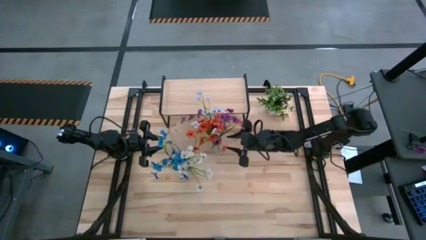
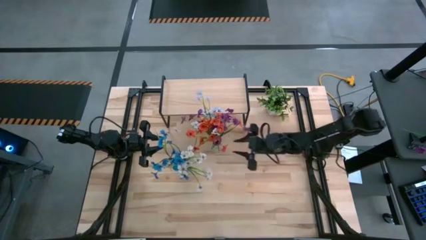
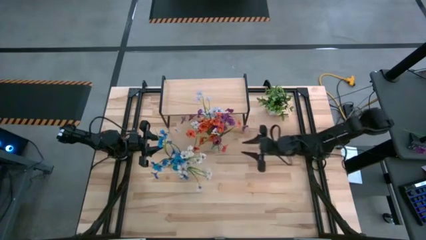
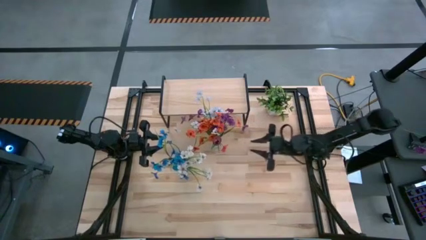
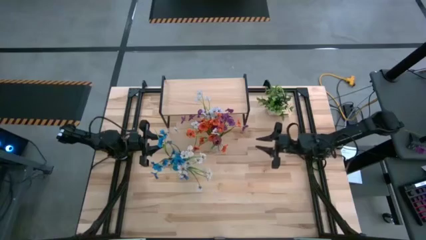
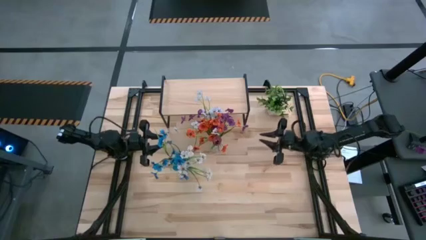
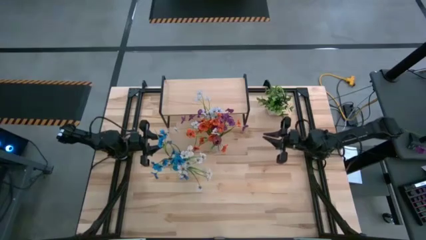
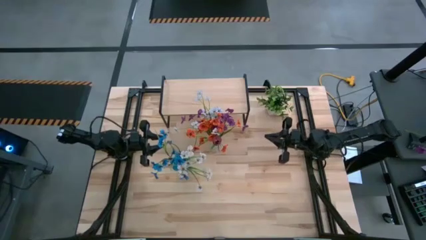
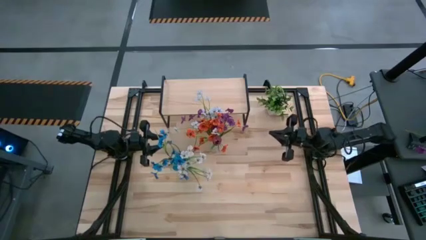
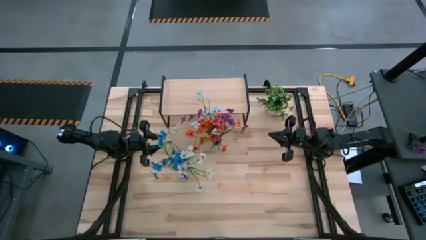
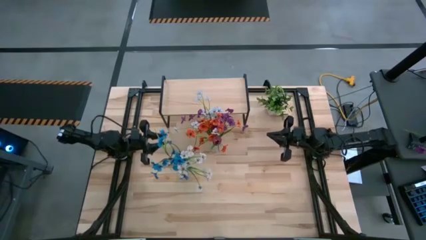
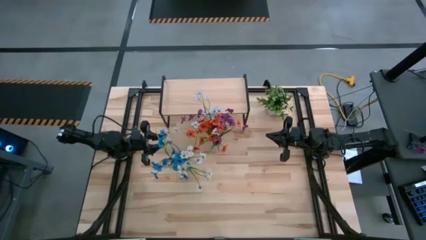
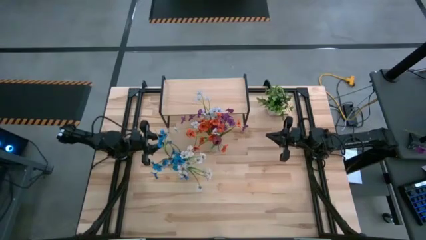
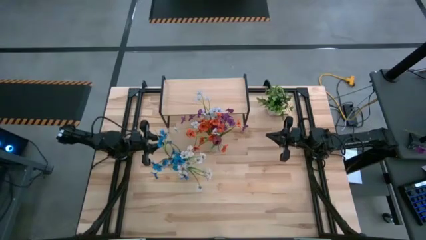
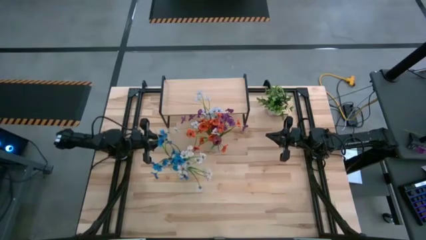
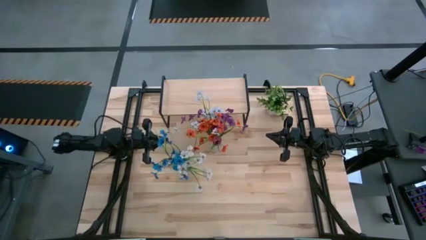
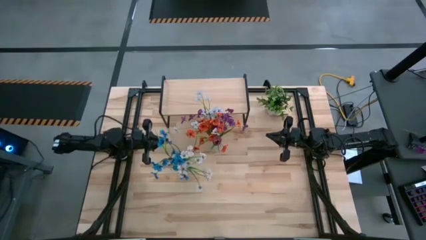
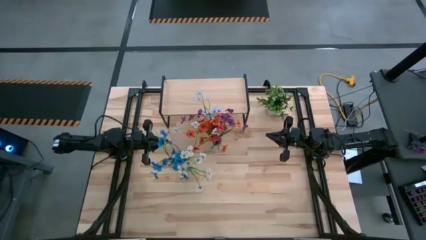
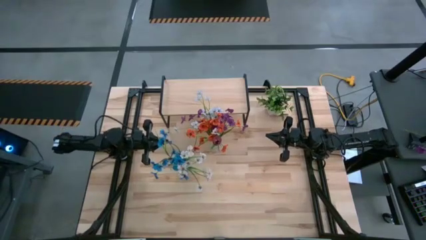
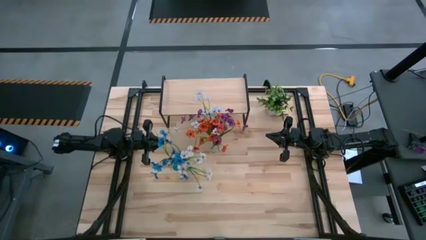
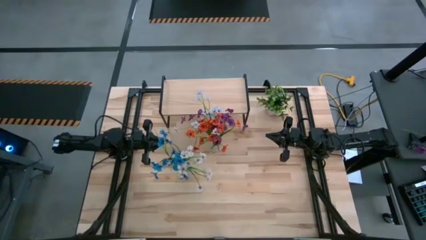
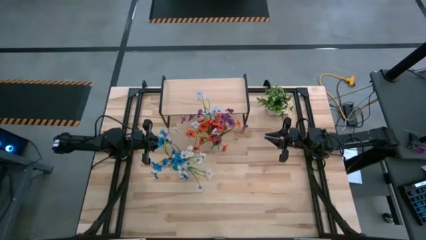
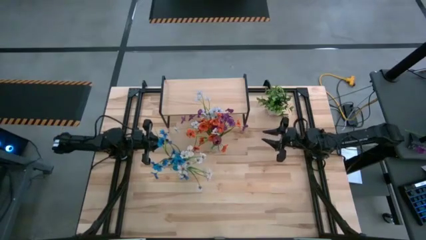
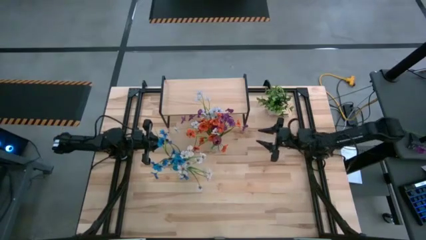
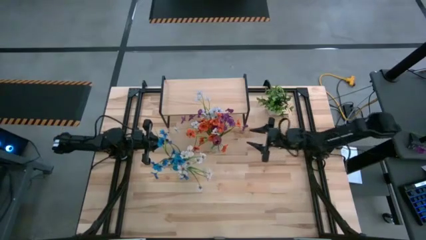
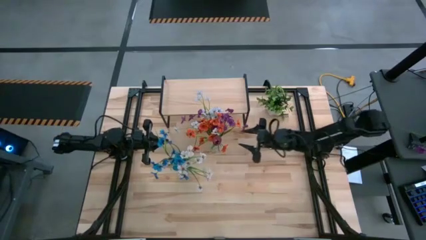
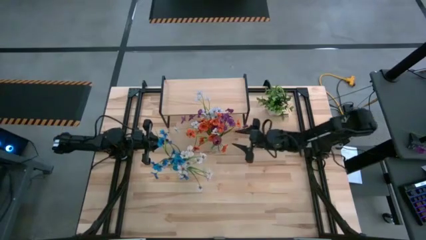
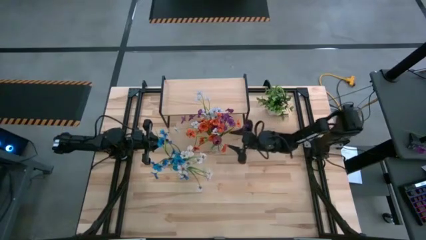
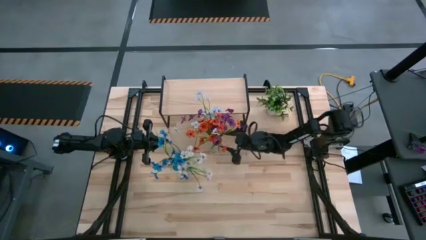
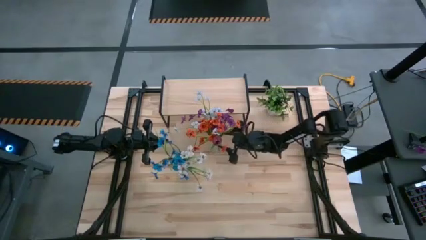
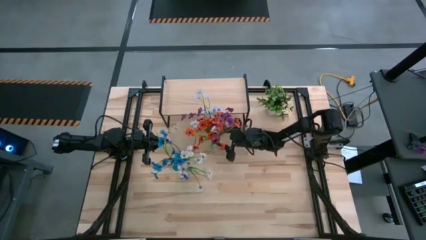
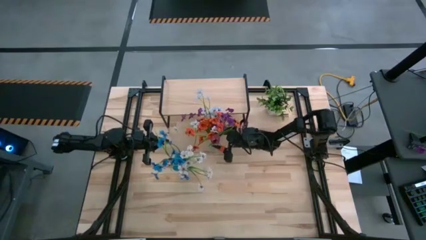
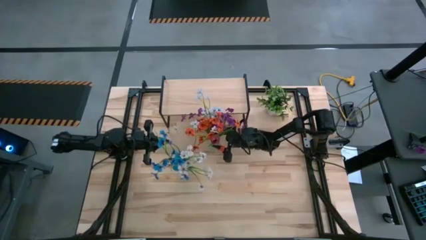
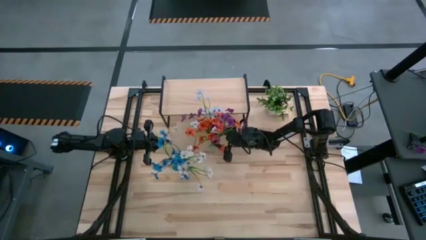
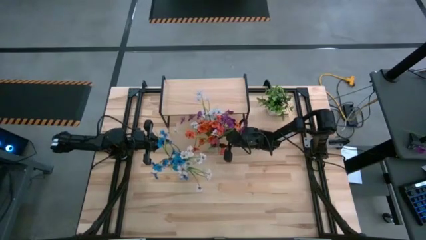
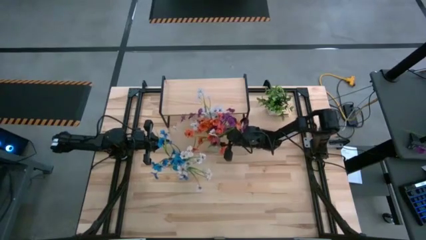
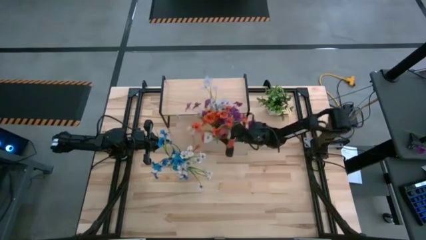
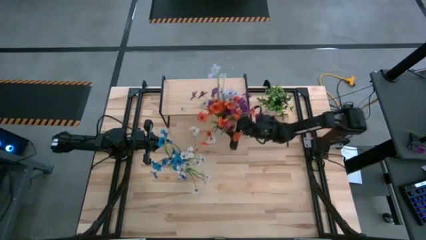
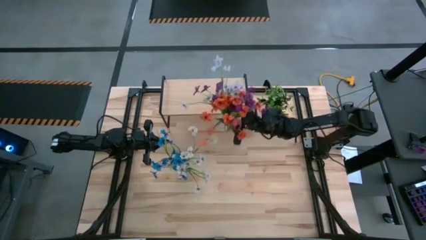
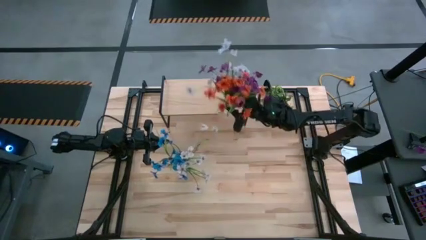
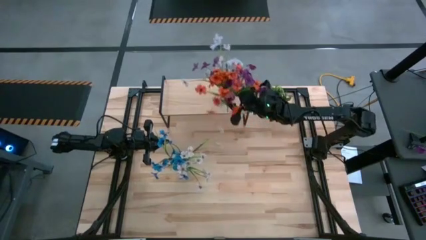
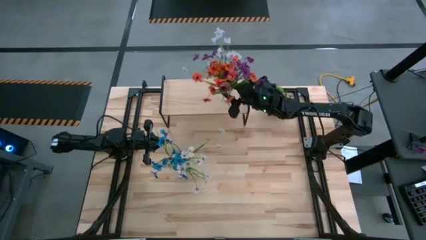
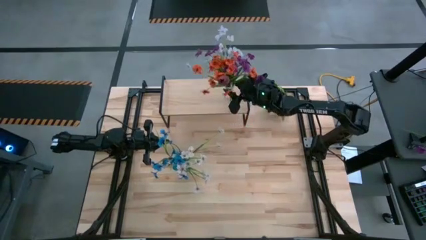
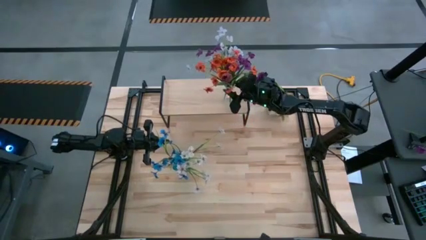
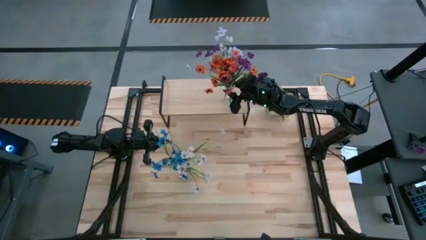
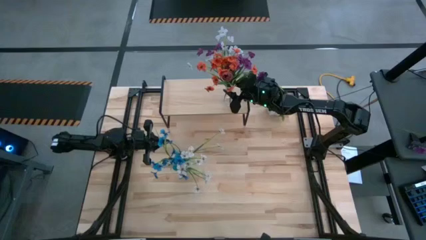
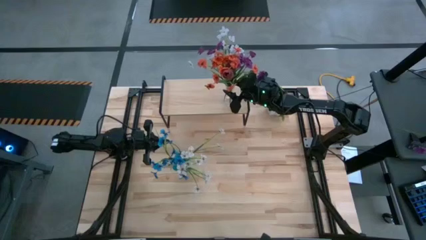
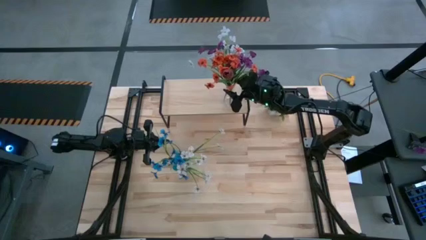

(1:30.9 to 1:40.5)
Task: Pick and place flowers into a vace then onto a shelf
Put the transparent vase on the shelf
